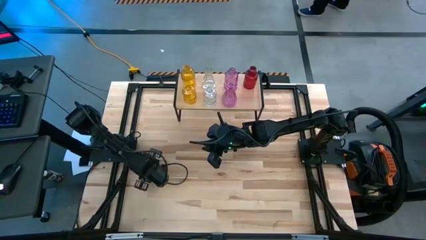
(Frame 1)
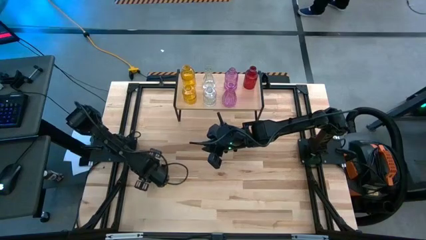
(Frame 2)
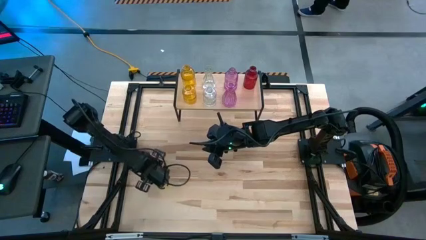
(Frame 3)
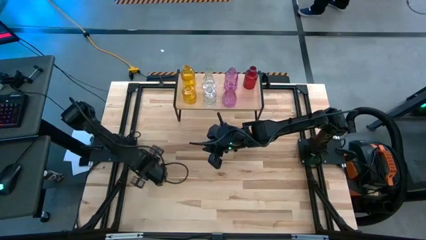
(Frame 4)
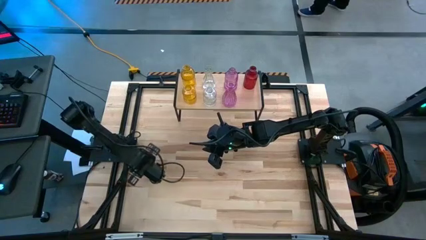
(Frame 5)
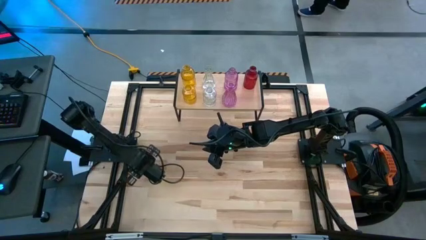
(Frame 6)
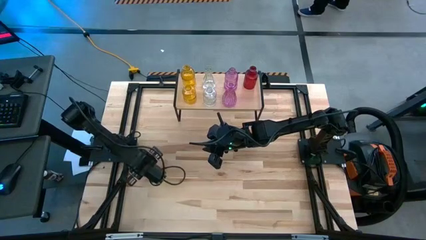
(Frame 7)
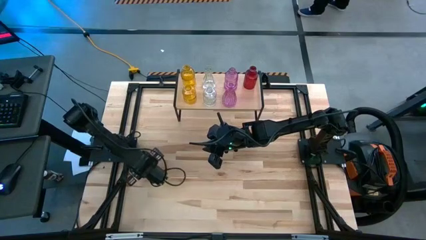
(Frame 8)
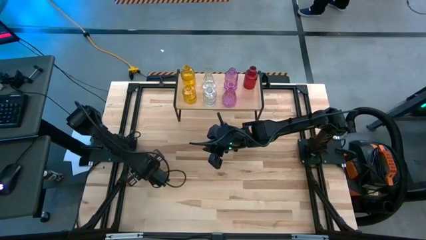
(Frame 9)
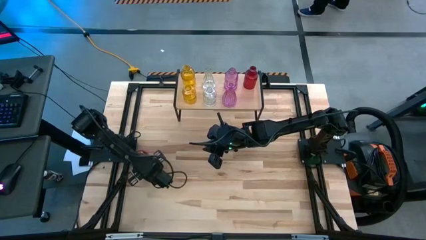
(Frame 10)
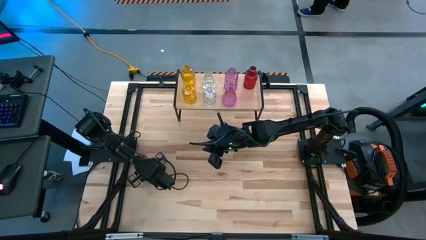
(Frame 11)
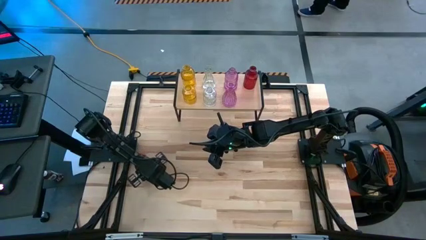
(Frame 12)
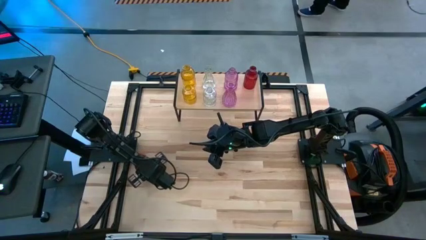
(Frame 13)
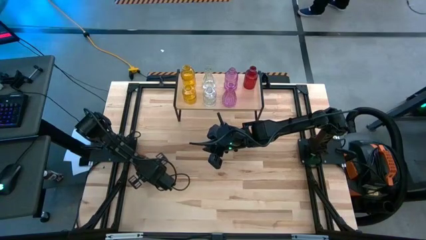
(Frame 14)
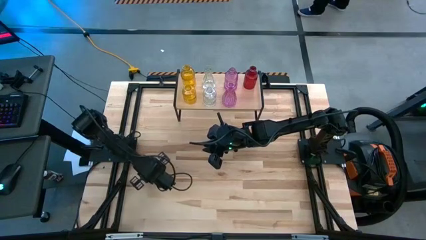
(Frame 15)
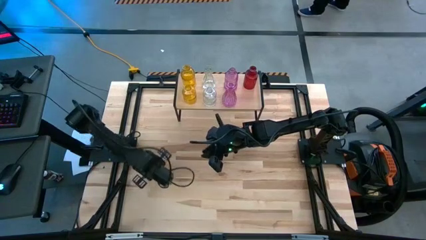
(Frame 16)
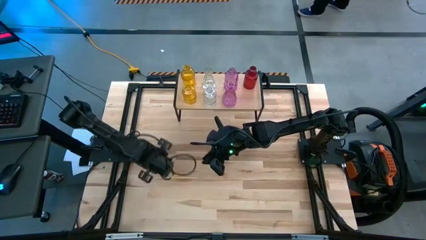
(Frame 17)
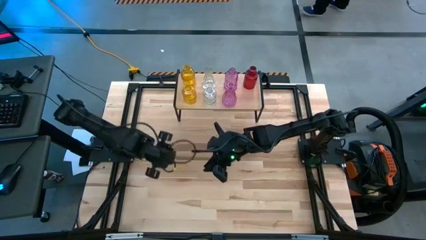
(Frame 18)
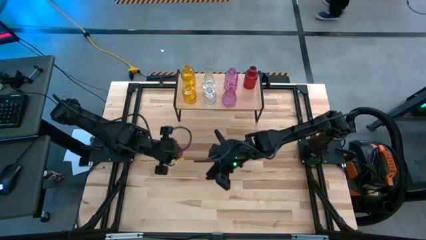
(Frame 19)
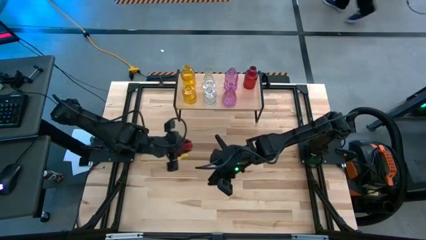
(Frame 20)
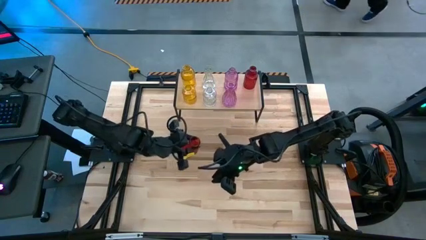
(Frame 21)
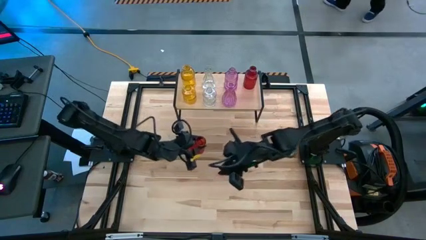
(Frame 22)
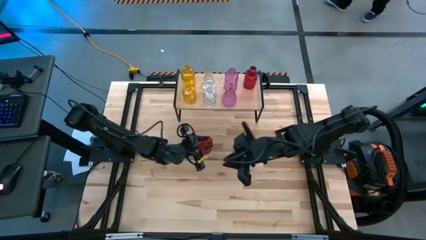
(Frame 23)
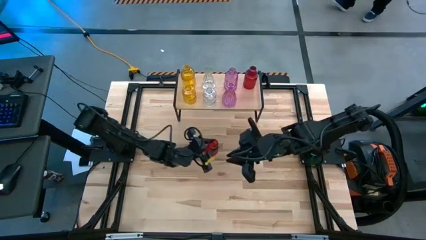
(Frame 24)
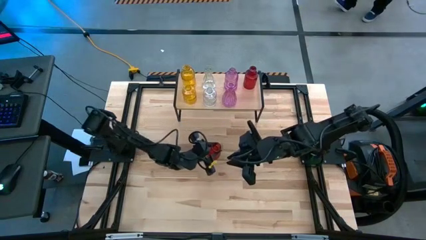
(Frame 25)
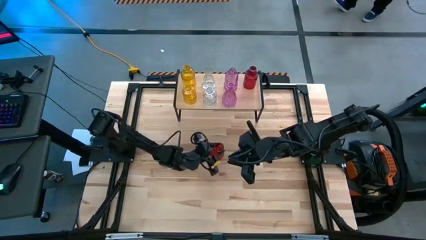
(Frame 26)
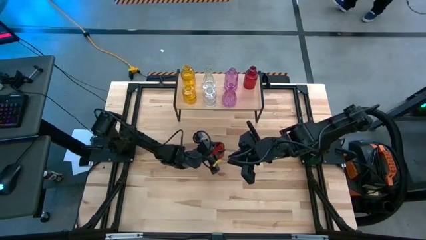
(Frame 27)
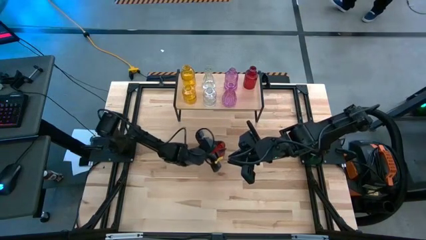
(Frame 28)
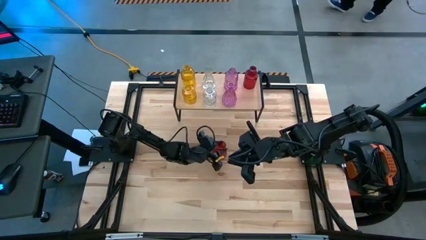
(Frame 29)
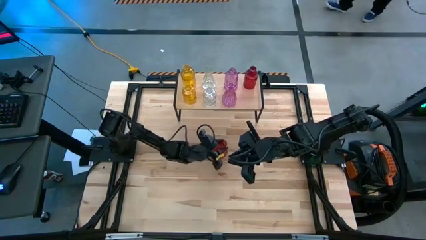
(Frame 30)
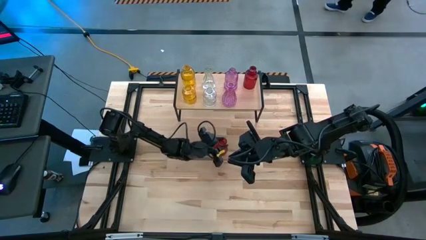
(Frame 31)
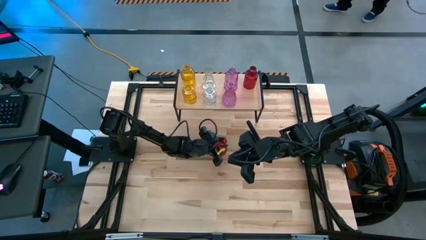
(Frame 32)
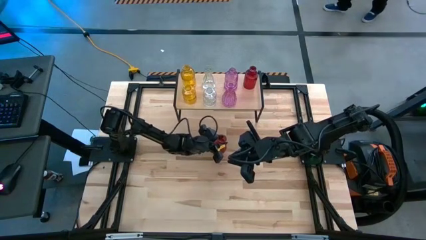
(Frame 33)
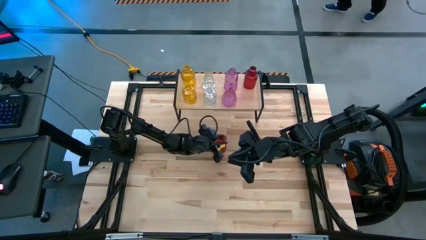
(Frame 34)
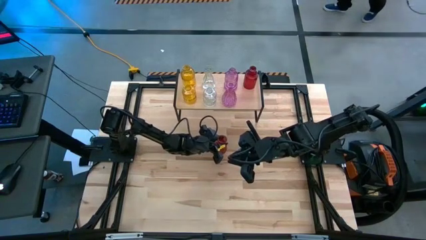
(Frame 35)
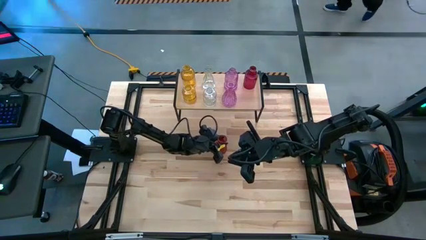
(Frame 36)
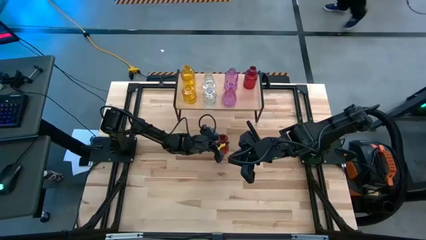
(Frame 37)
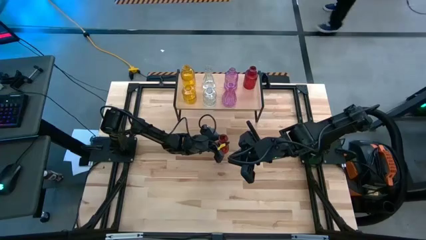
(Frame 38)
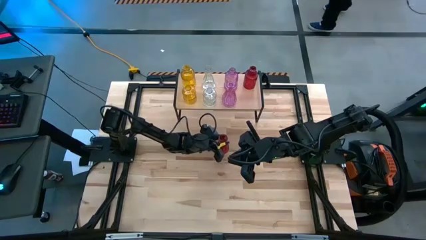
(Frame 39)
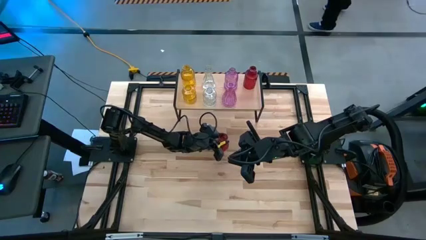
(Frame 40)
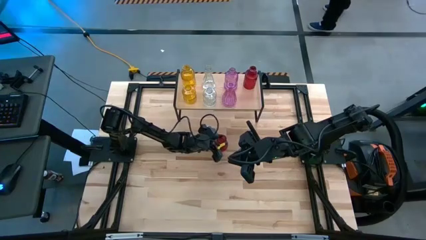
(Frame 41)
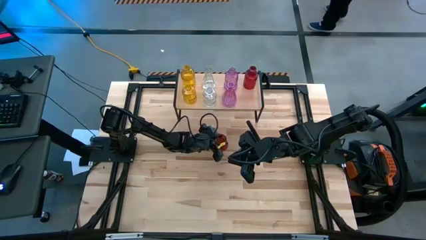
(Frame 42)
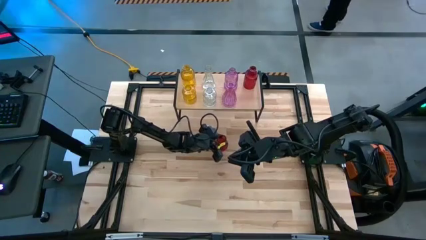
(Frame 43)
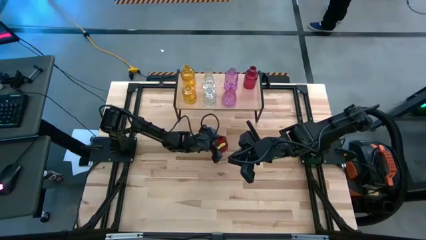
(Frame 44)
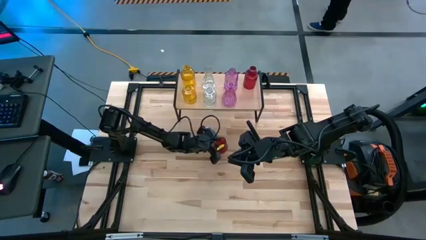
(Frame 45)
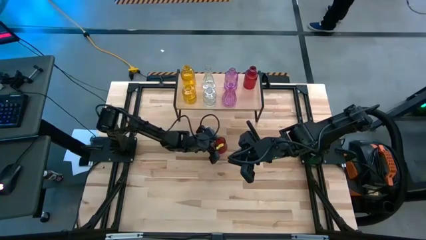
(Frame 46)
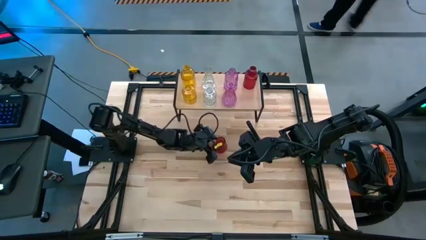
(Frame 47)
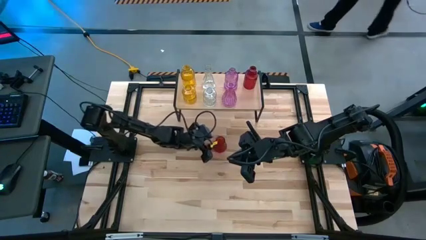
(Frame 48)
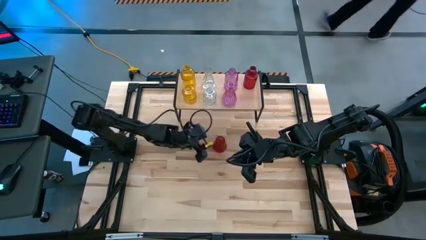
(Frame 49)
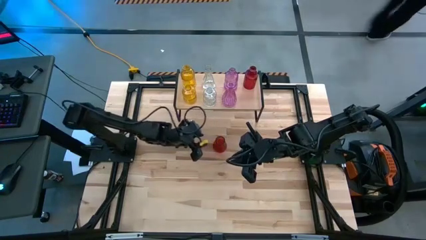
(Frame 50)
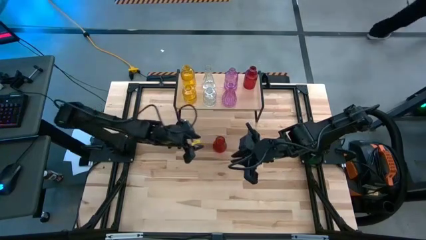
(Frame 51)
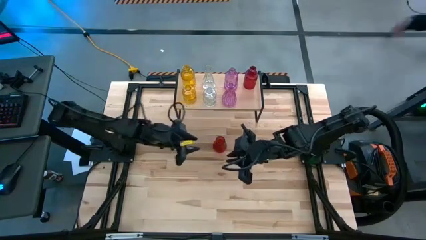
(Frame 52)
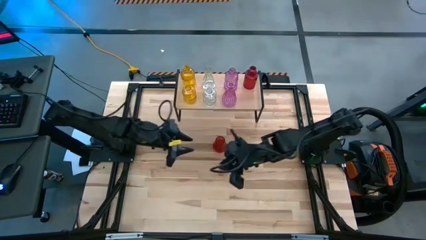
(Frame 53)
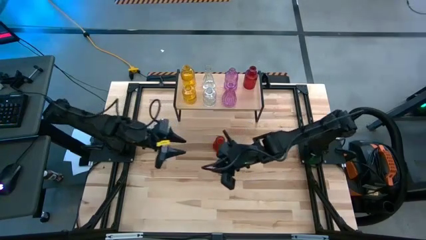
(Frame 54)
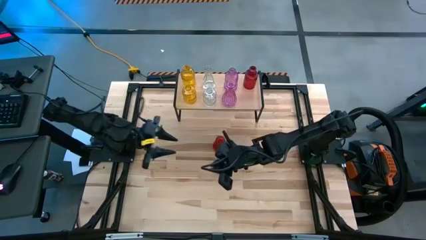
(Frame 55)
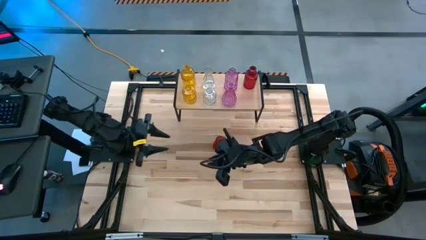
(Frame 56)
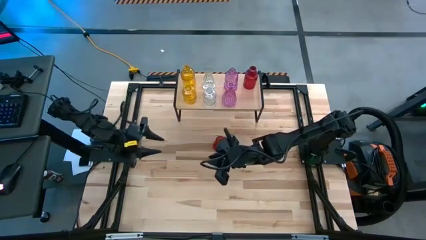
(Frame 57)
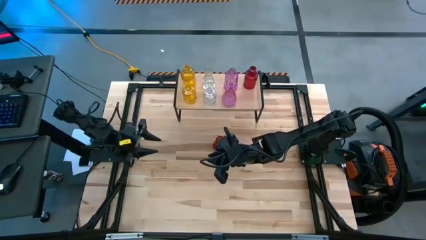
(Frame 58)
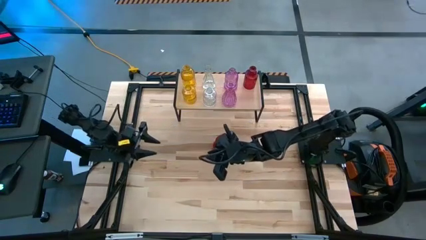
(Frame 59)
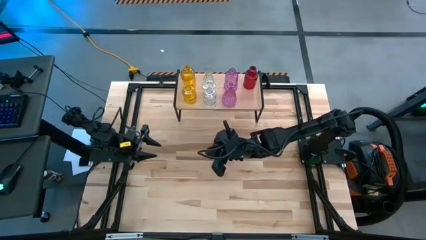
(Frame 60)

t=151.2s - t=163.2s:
Task: sort vases onto shelf
Put the red vase on the shelf aligned with the other red vase

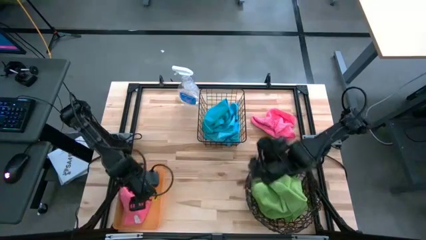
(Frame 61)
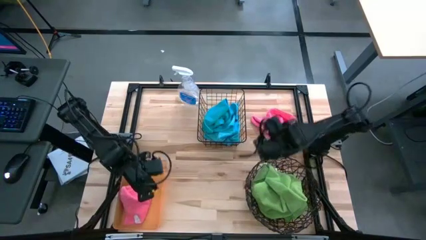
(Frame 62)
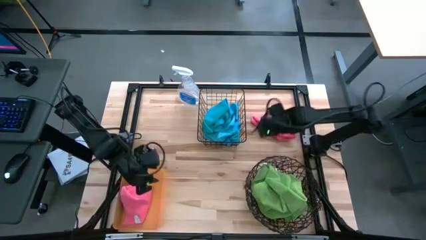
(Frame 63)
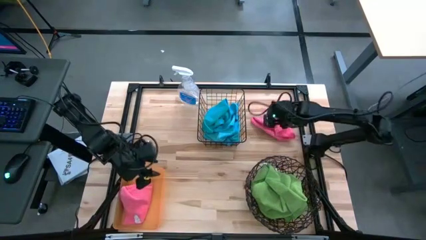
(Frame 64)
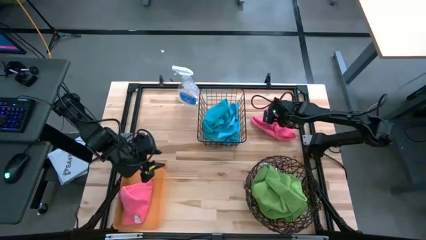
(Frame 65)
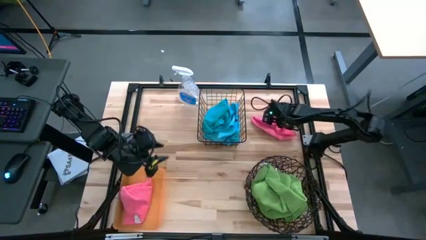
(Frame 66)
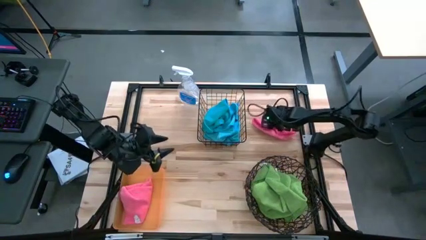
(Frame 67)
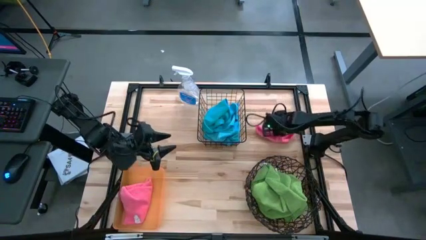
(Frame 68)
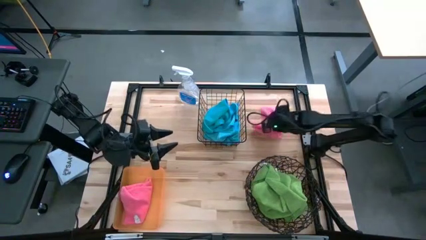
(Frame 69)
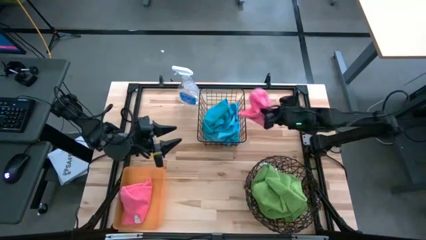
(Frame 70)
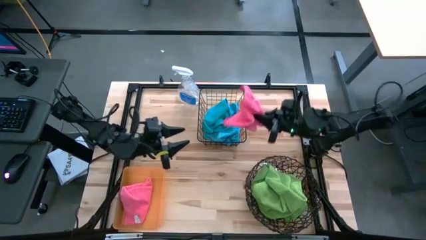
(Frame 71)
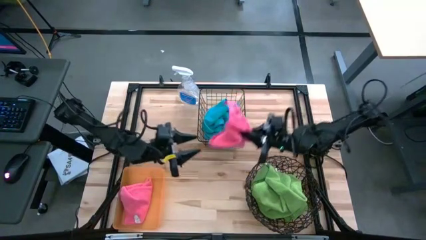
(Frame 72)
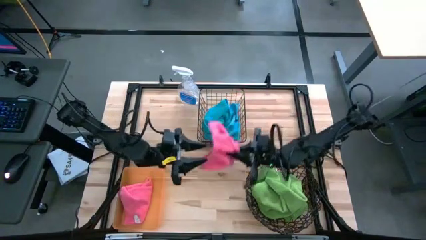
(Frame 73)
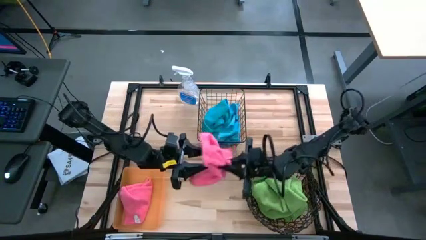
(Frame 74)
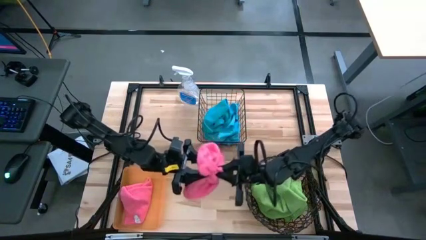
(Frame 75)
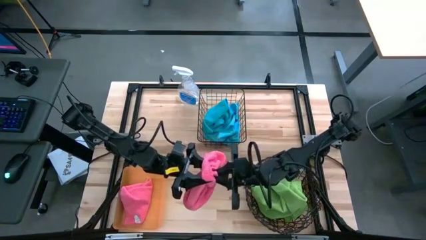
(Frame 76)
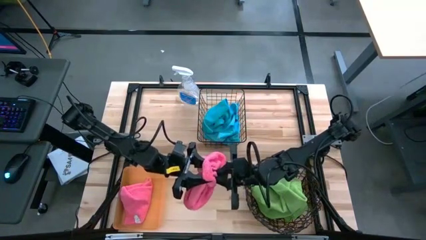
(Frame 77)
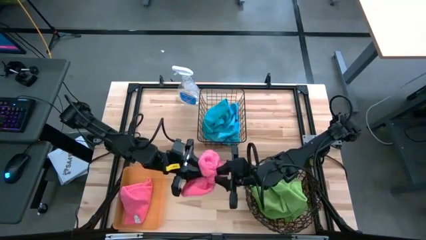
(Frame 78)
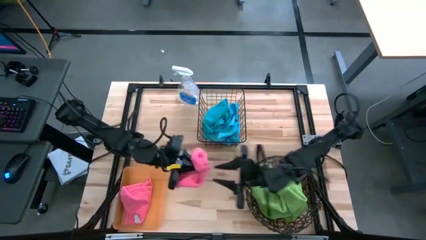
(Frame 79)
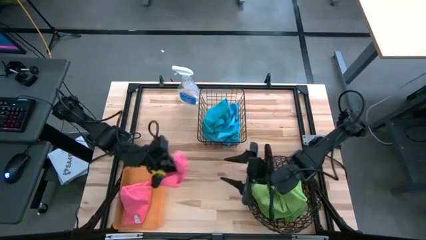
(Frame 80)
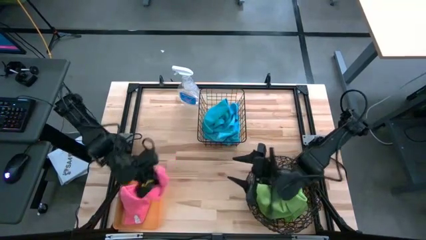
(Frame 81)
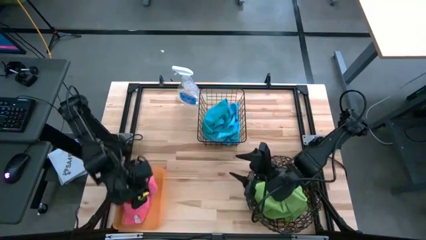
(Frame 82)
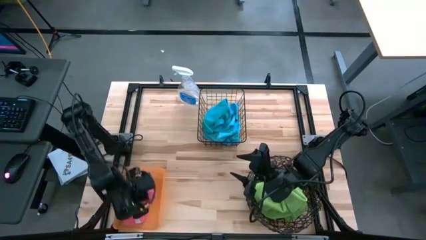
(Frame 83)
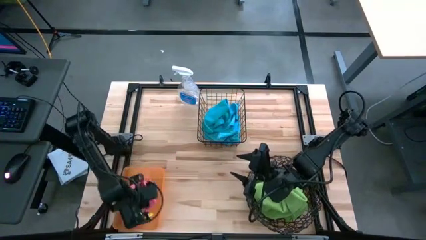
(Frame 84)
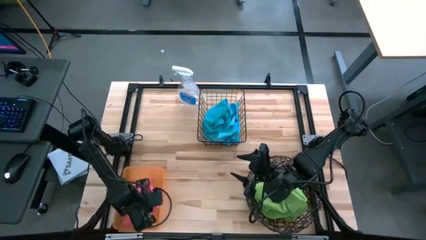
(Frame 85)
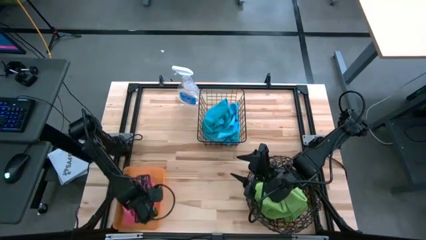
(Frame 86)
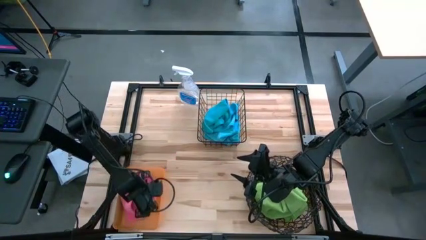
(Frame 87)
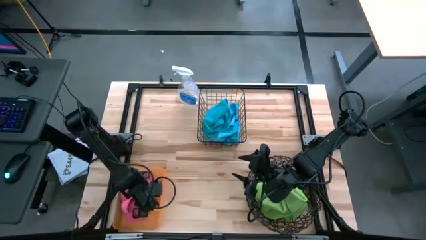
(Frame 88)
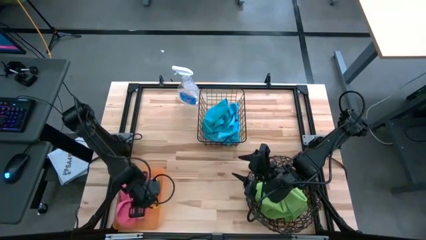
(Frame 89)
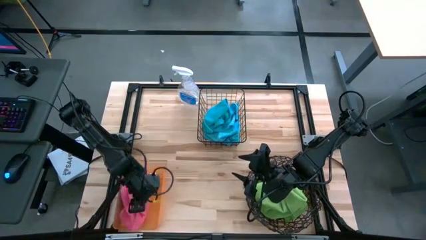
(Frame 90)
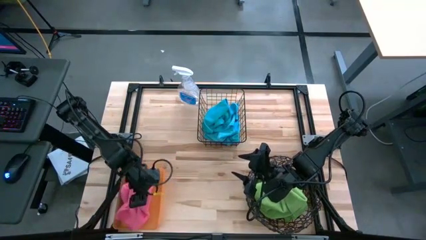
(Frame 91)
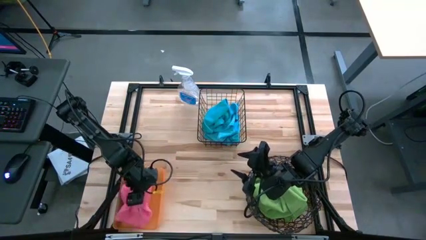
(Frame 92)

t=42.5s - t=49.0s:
Task: Sort microfiber towel by color & place in baskets
Put the pink towel into the orange bin
